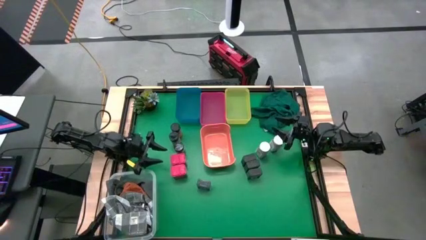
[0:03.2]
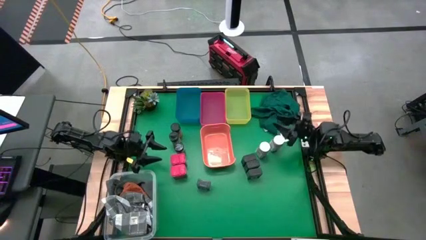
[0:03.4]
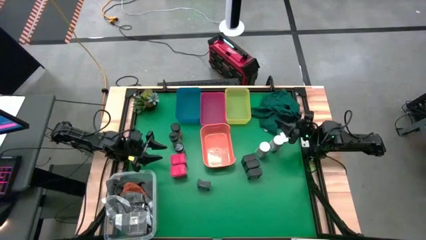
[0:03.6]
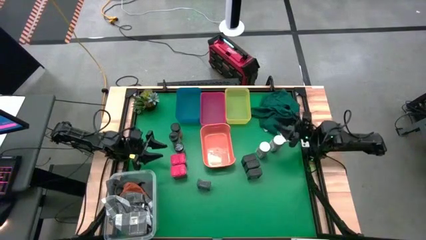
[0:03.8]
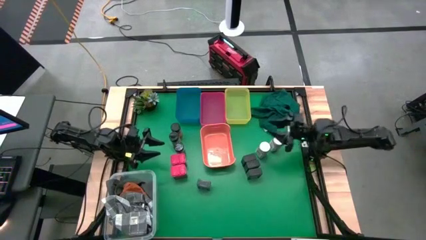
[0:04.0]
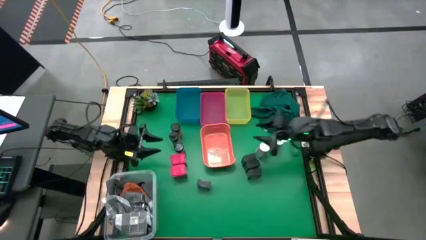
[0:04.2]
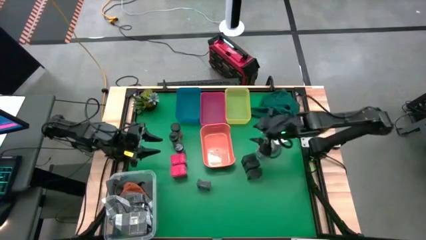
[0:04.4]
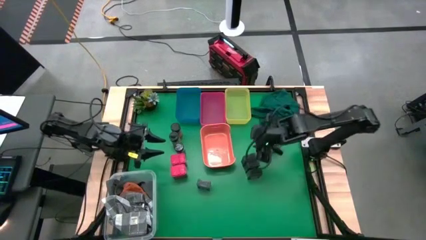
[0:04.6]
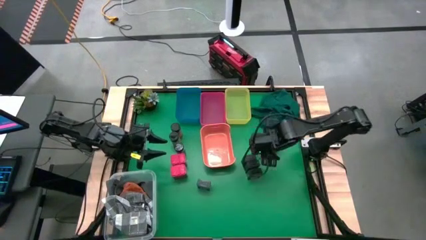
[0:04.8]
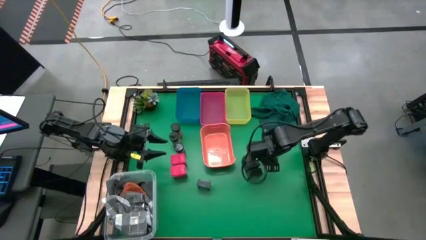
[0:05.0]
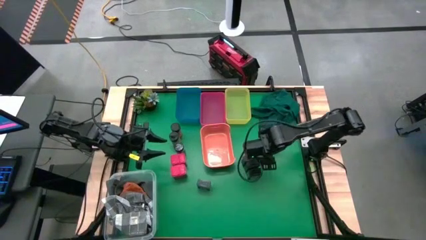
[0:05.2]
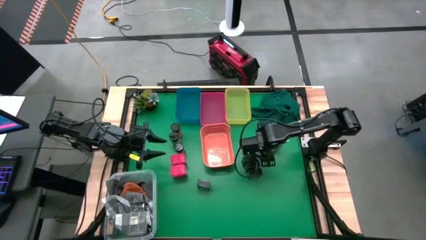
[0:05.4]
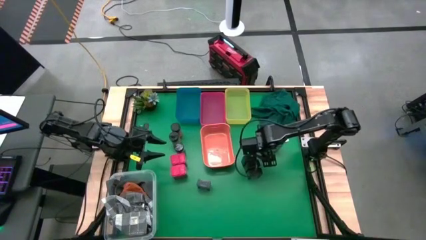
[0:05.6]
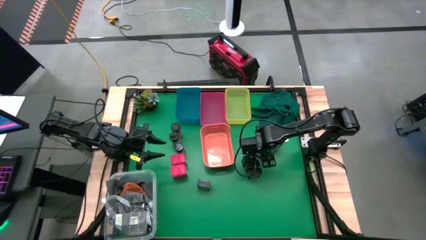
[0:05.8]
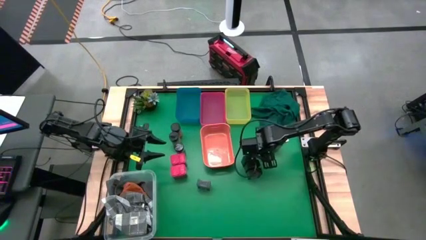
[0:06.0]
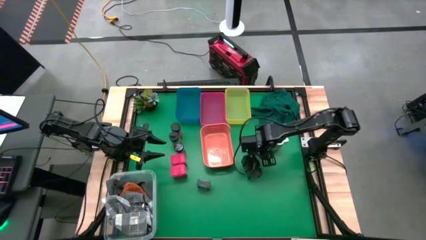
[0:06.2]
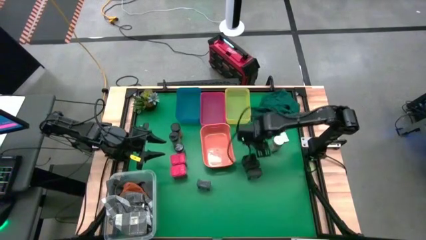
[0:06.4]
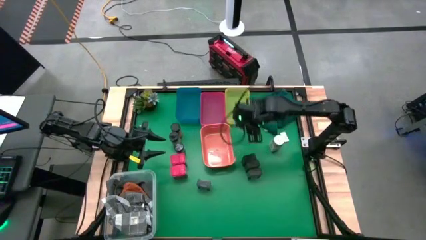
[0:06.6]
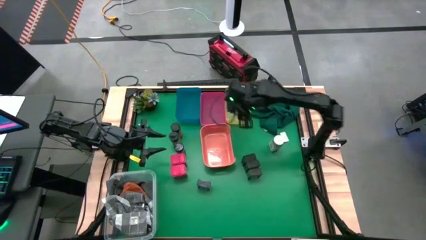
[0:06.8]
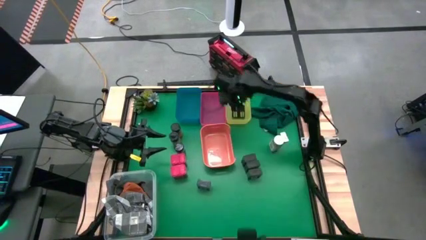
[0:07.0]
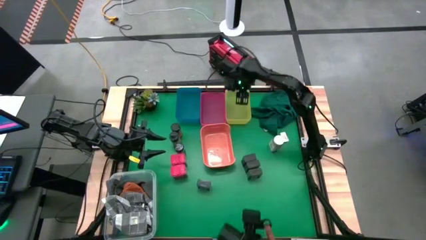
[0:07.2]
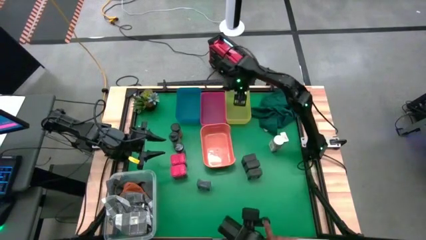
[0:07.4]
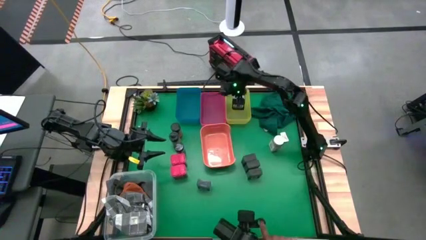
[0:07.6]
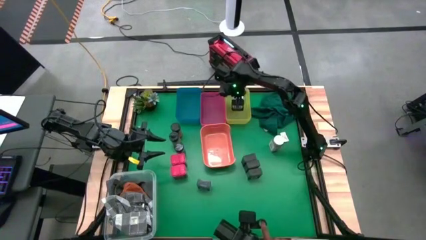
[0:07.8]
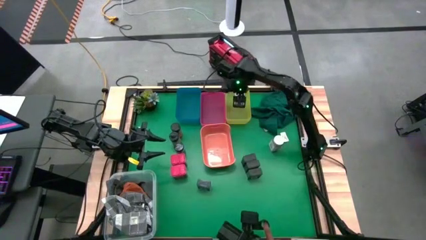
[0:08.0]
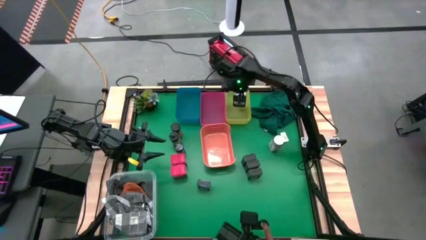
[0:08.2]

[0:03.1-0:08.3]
Task: Sort spices by type
Put the left white seasoning bottle into the yellow bin

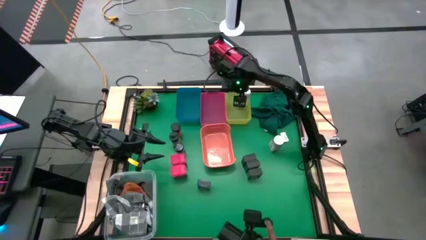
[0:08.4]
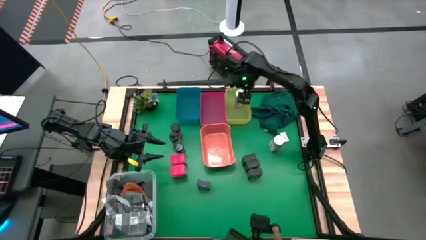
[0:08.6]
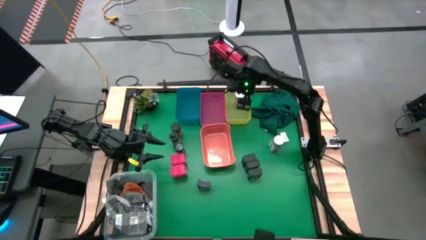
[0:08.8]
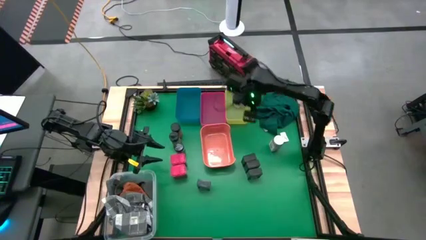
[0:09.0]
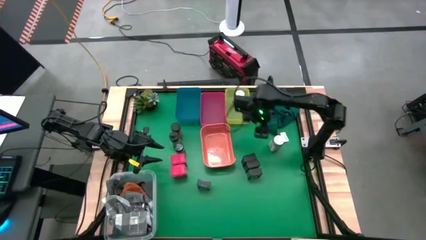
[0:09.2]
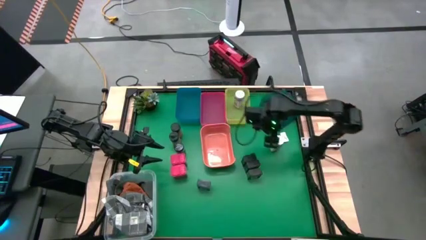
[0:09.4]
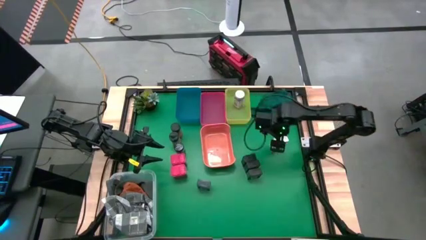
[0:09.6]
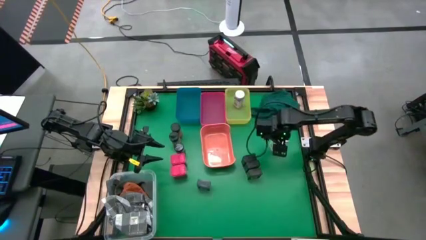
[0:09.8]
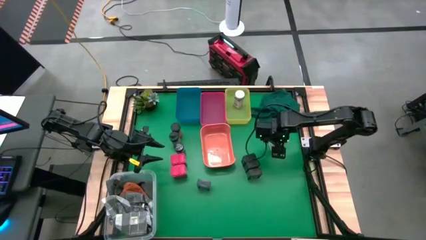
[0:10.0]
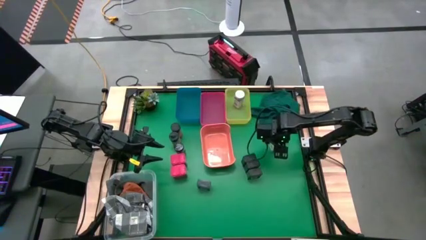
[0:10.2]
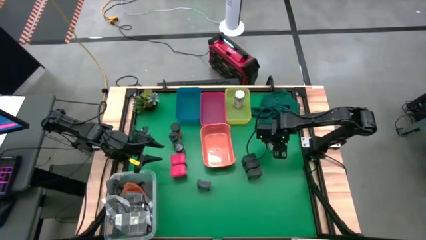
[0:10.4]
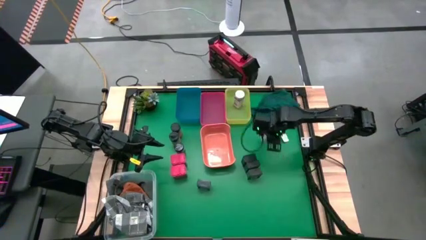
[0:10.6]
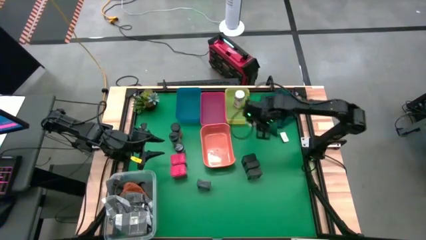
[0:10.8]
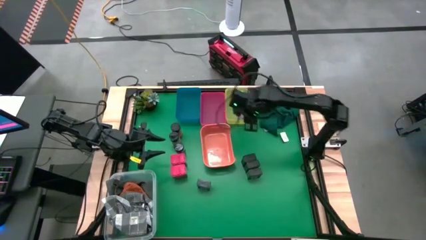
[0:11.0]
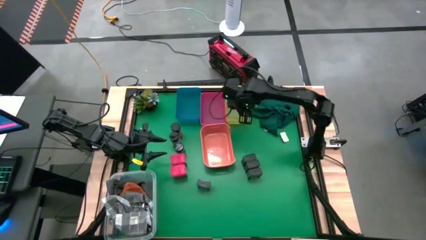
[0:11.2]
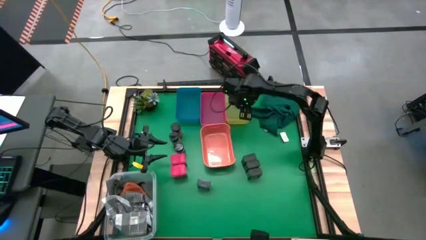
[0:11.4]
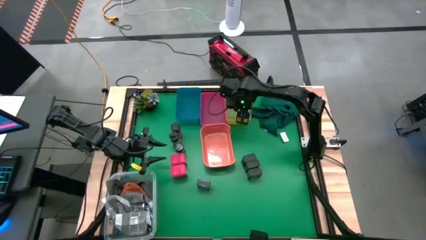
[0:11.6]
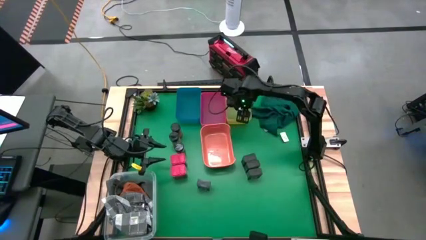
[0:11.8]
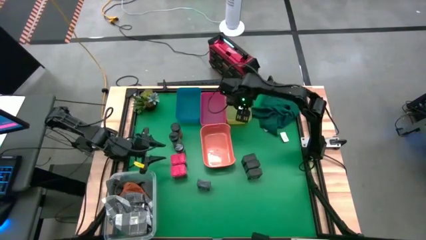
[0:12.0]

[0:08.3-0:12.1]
Put the white seasoning bottle into the yellow bin

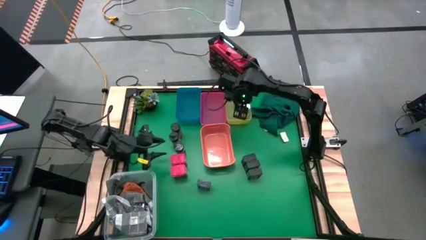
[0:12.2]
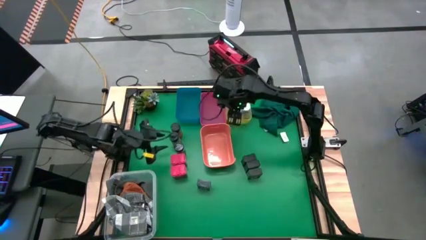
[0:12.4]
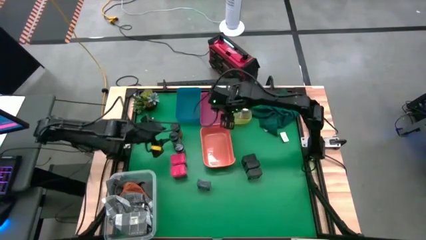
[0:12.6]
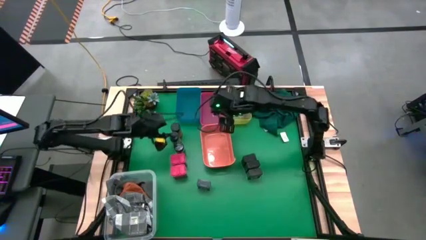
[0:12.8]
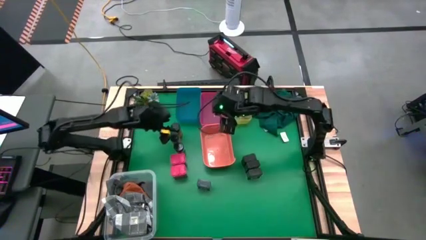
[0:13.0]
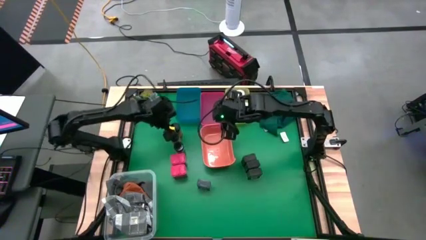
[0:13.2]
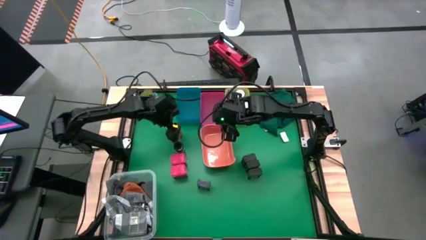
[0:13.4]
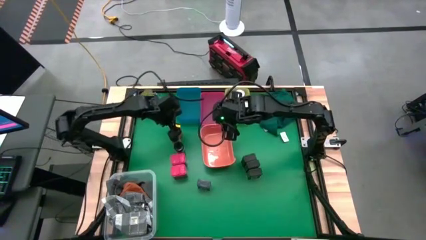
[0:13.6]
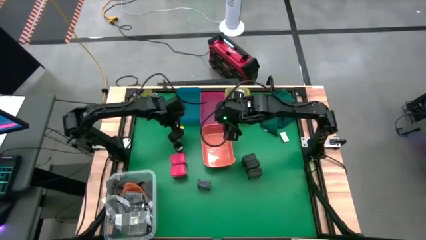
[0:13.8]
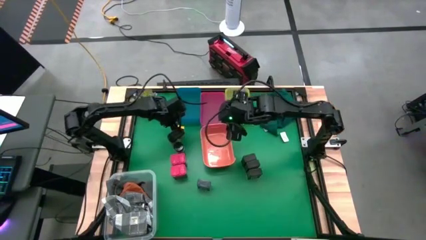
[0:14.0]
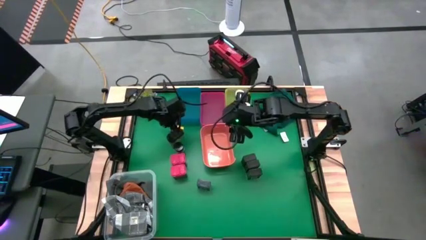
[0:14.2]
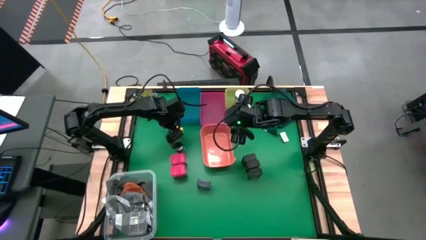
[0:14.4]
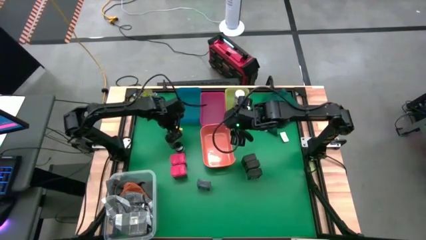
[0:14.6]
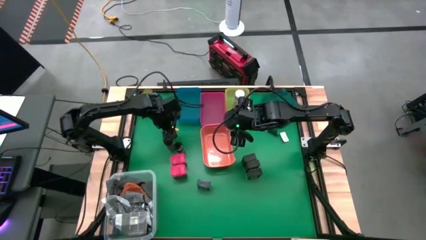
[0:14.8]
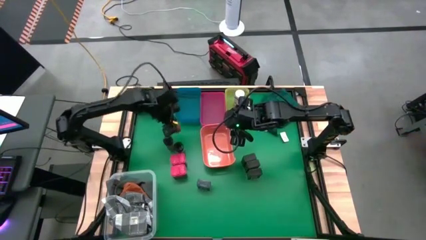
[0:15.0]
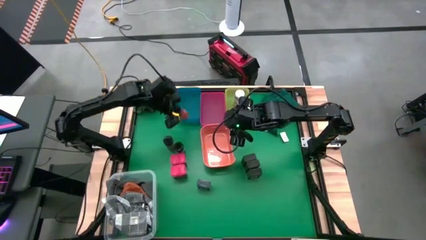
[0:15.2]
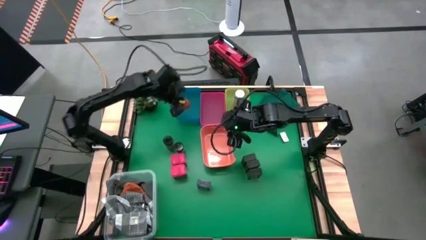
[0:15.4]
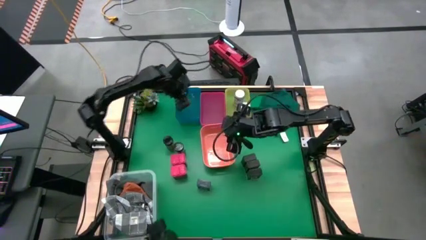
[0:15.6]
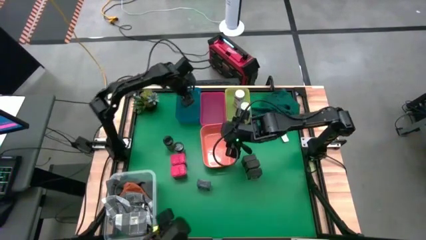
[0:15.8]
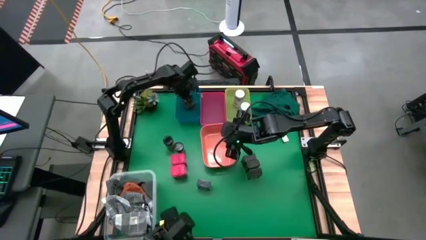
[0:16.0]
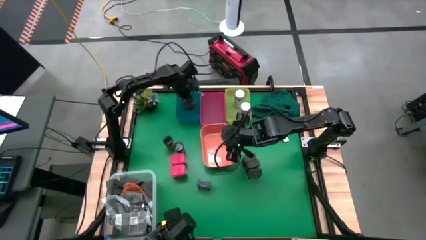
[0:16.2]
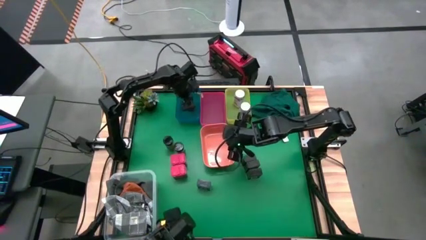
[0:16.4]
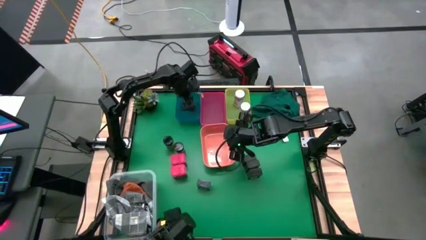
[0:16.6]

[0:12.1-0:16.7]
Put the top green seasoning bottle into the blue bin

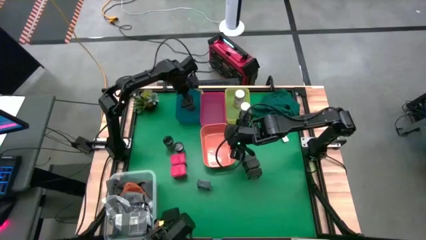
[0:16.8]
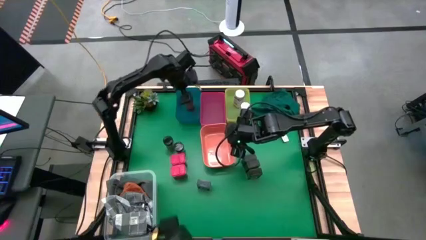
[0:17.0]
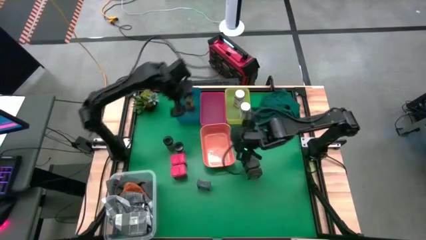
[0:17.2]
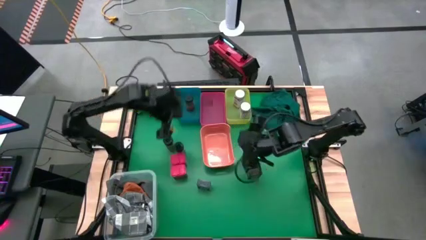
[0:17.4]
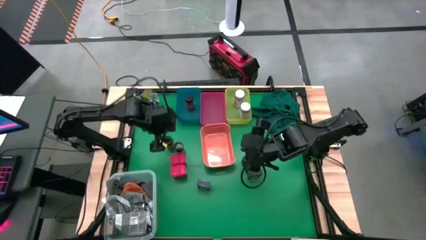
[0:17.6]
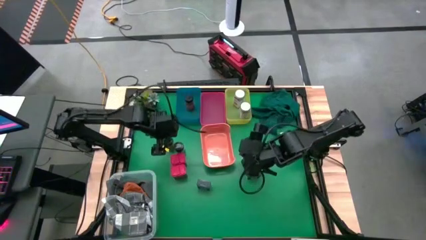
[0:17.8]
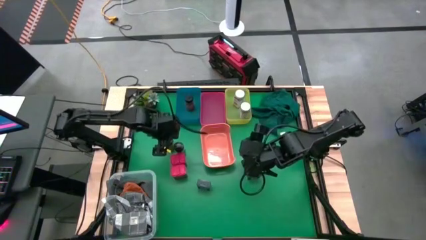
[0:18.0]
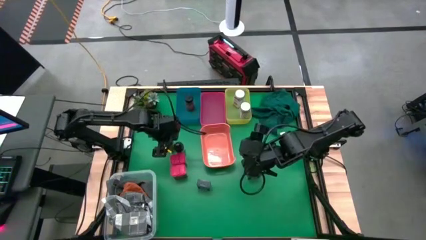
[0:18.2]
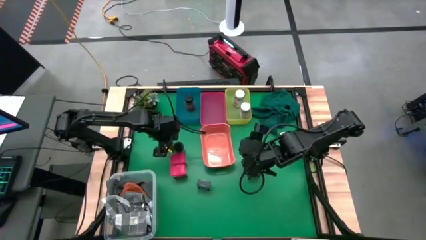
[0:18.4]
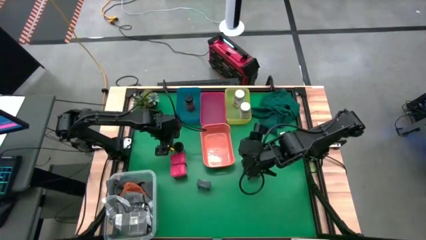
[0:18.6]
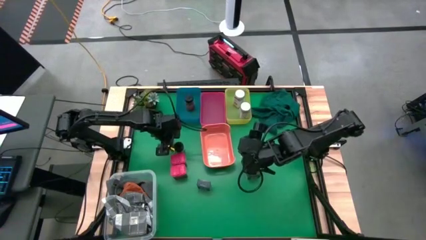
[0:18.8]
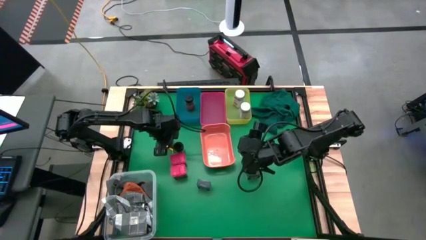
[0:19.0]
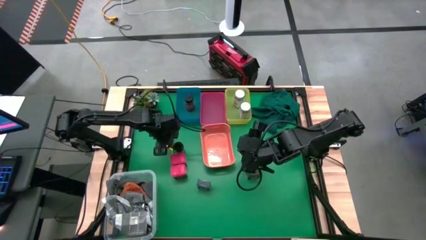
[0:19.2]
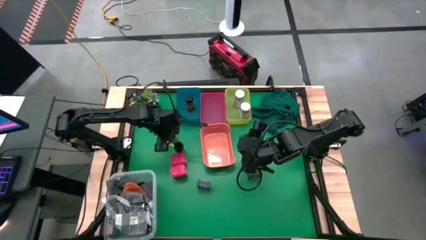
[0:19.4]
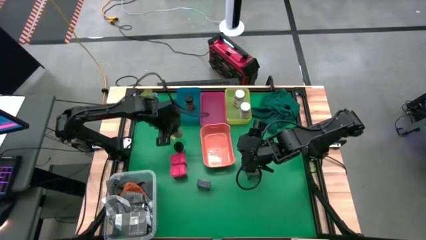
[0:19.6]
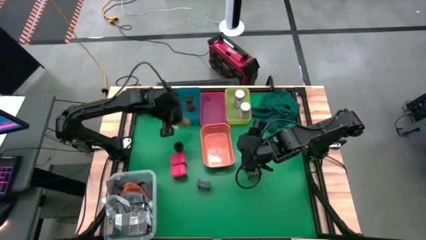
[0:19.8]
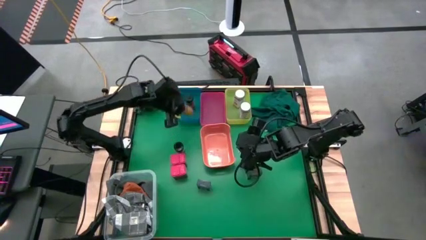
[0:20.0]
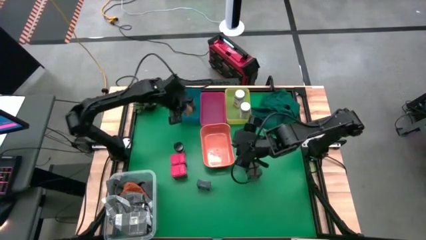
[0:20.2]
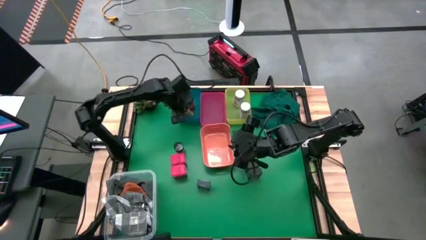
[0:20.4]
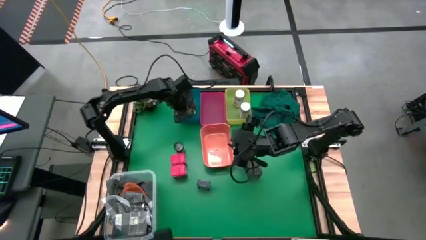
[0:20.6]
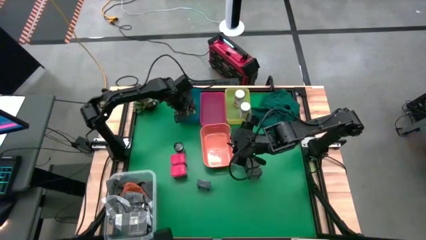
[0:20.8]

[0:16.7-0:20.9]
Put the top green seasoning bottle into the blue bin
